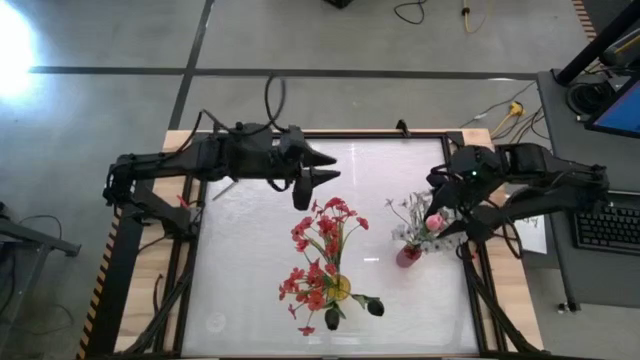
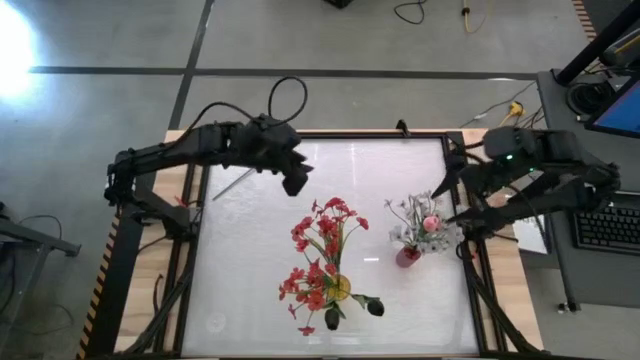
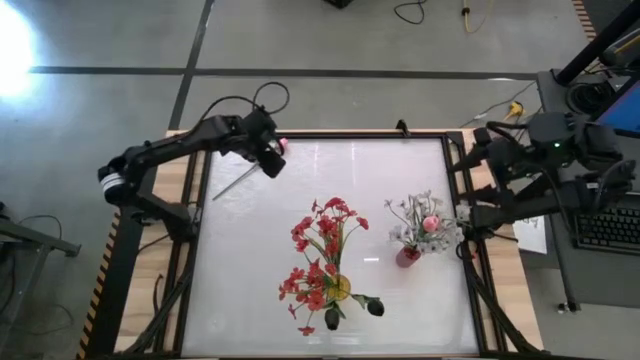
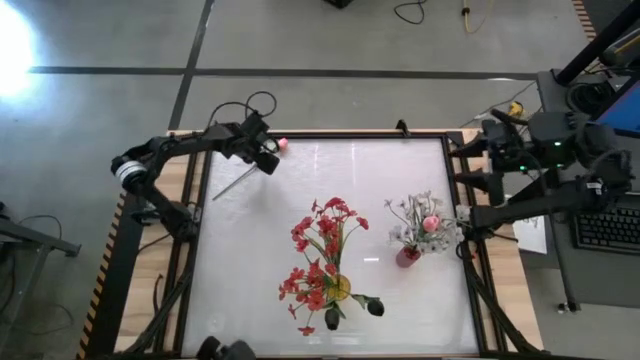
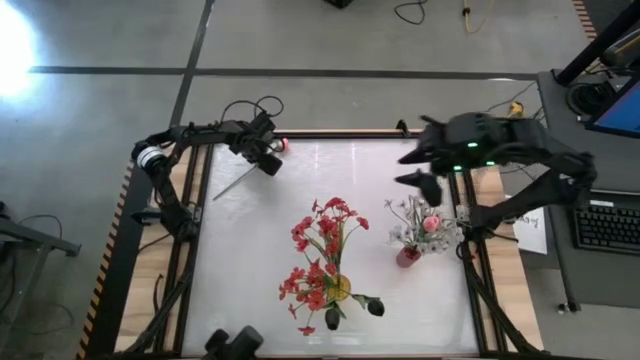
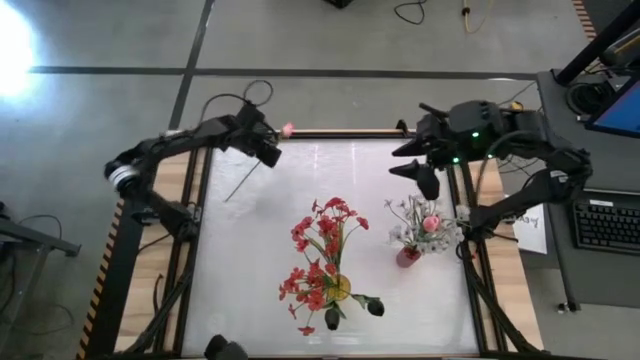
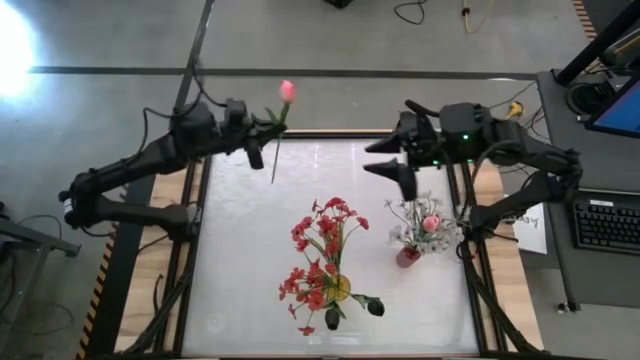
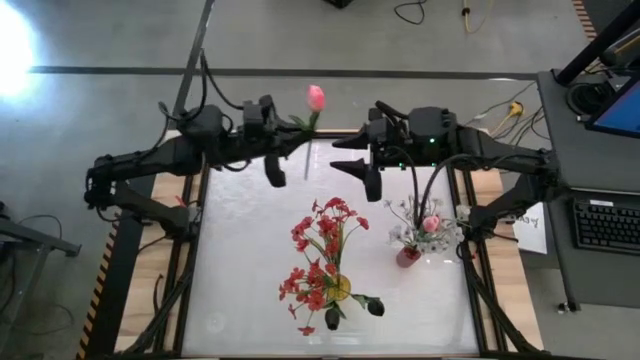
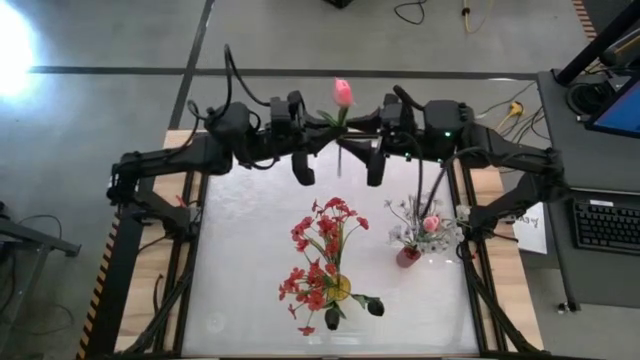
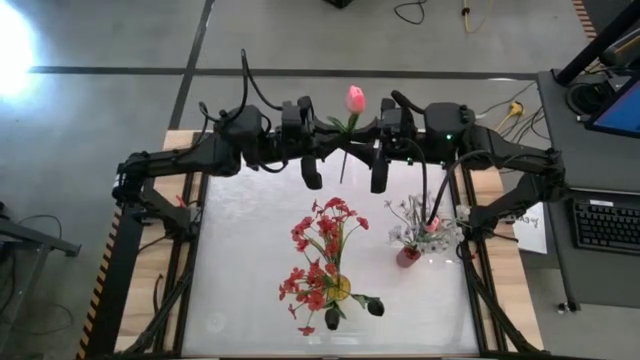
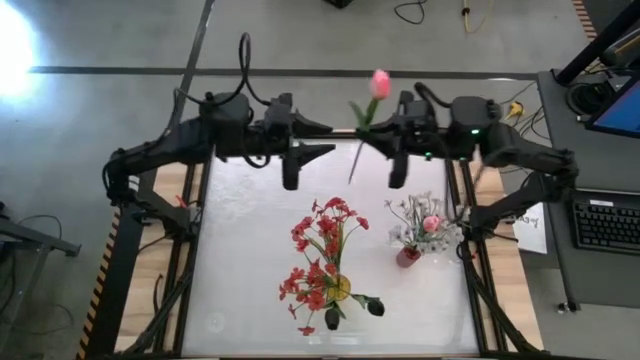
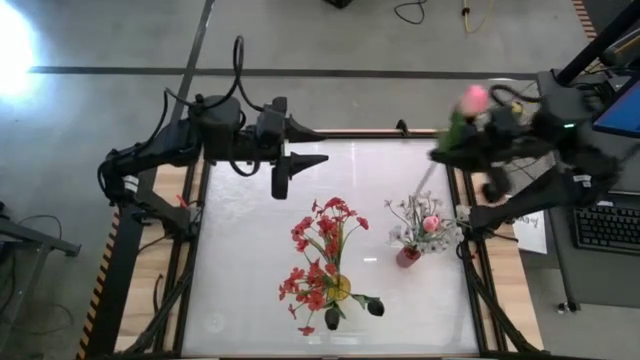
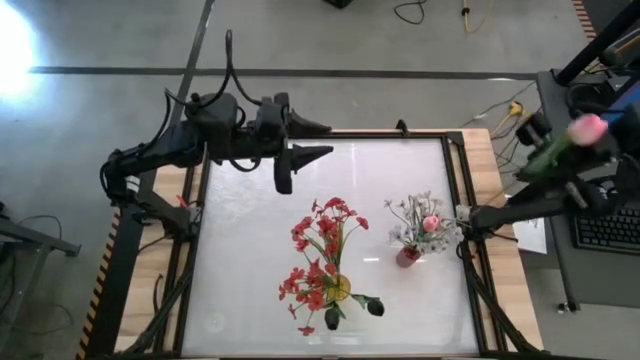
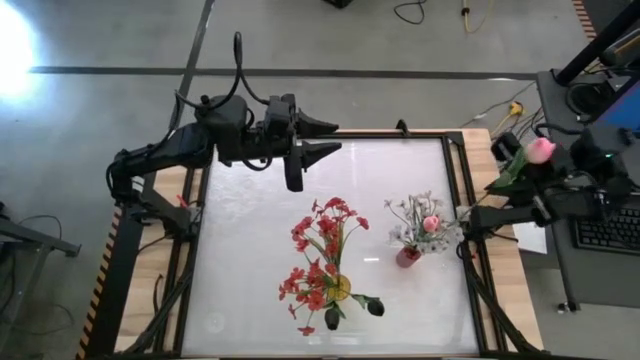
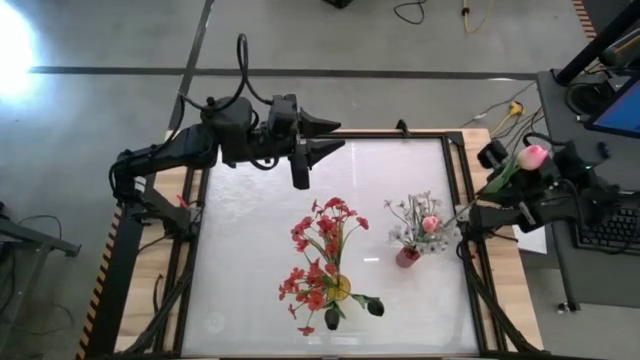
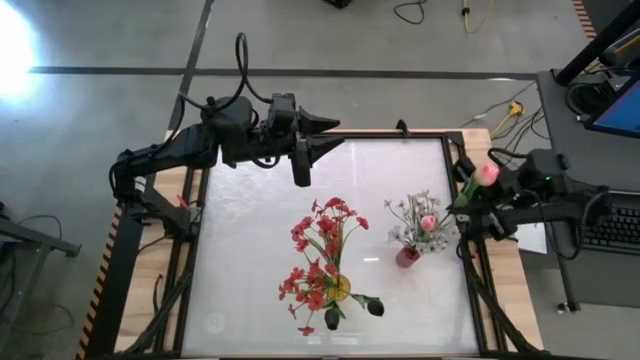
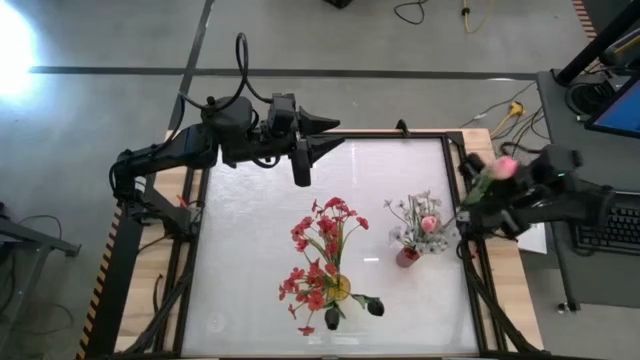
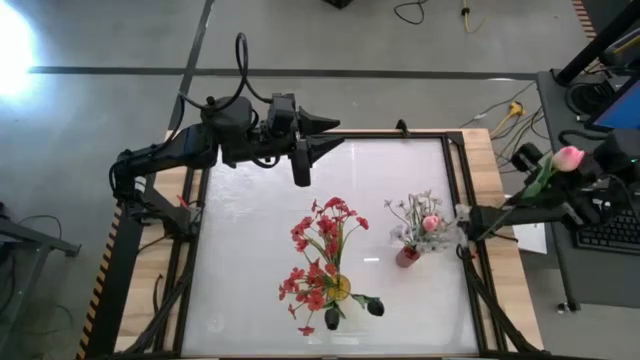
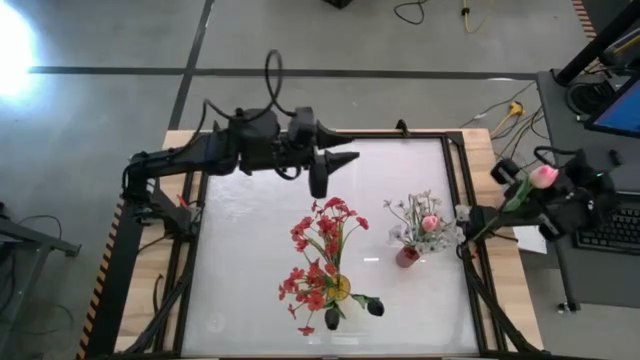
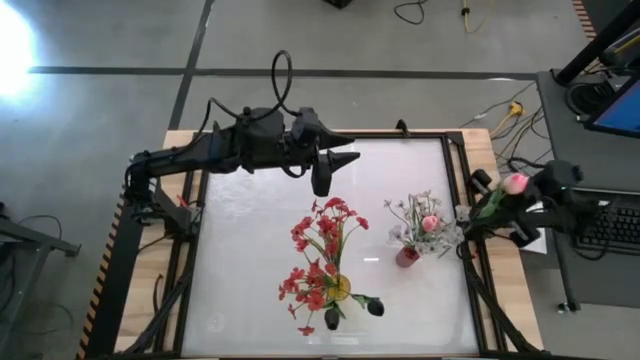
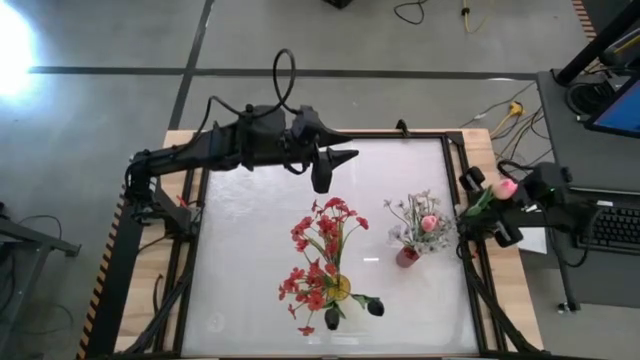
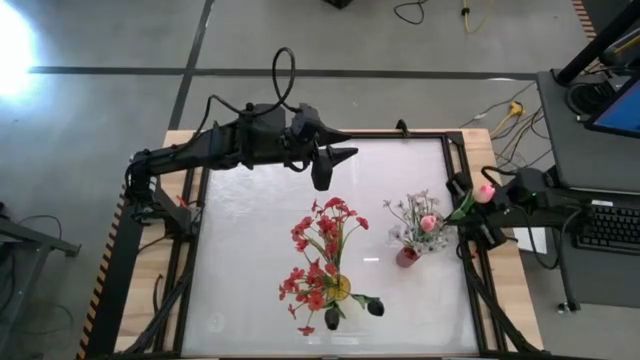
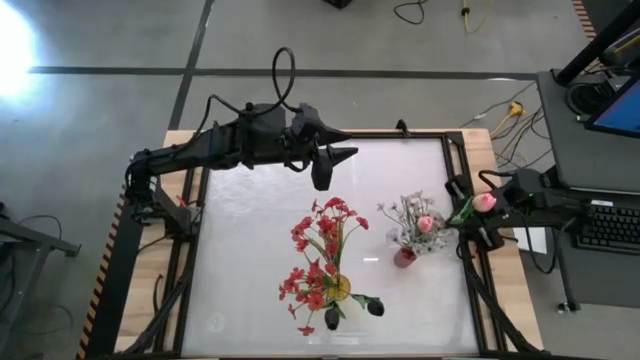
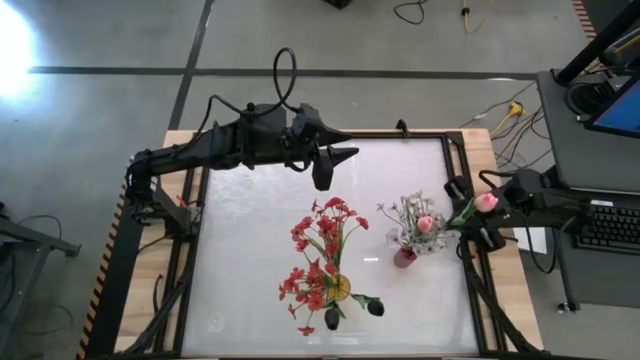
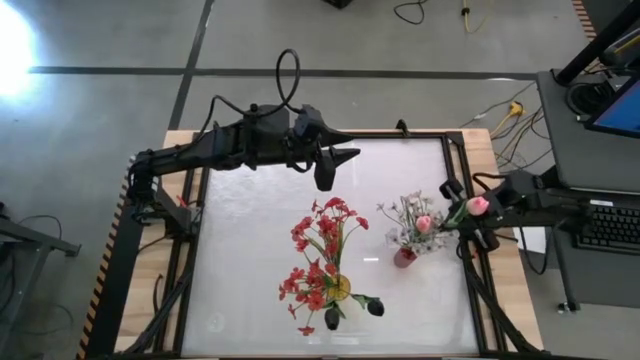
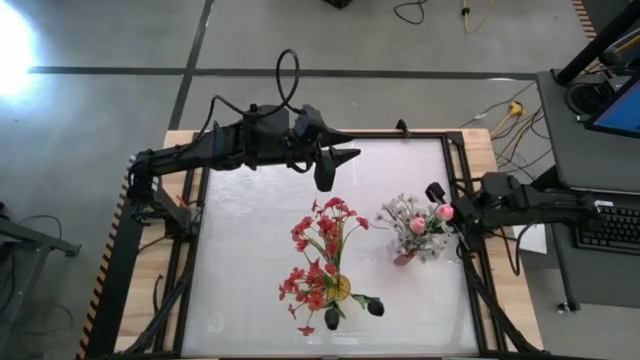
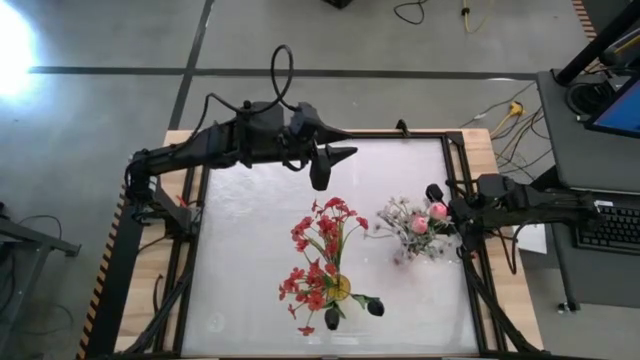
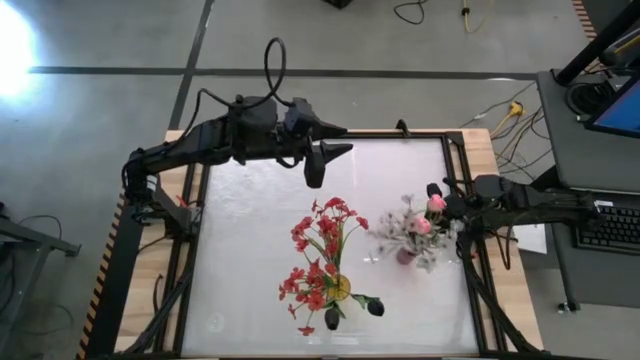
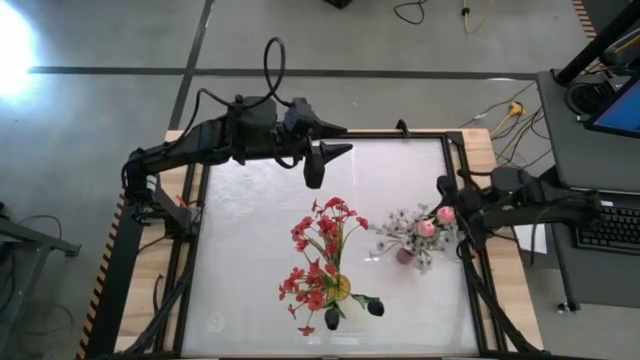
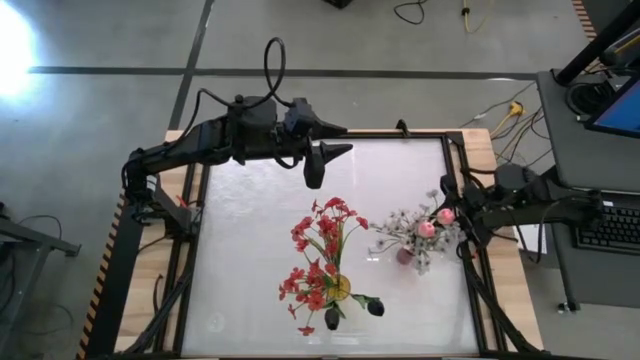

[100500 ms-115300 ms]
Task: Sort flowers into vase by color
Put the pink tulip into the red vase

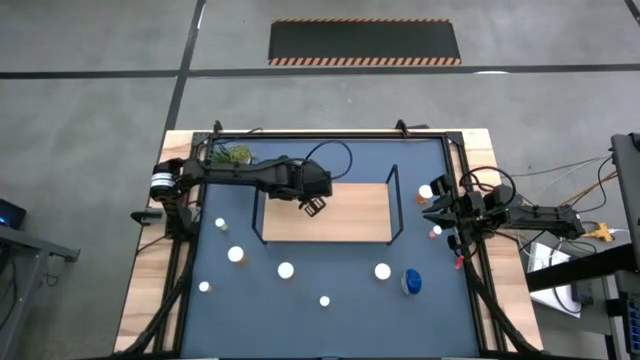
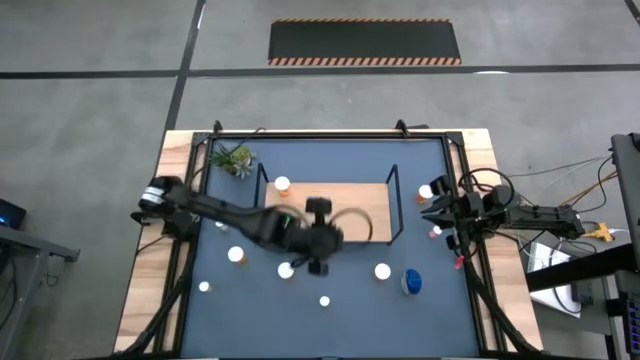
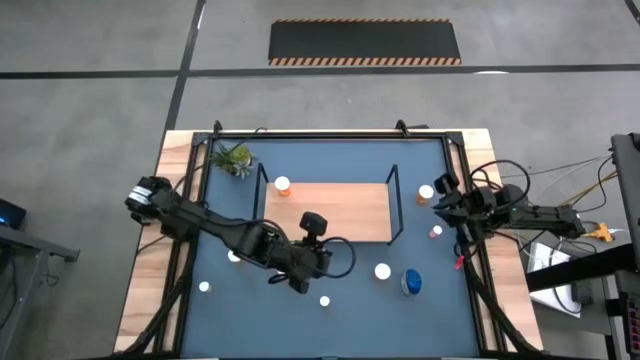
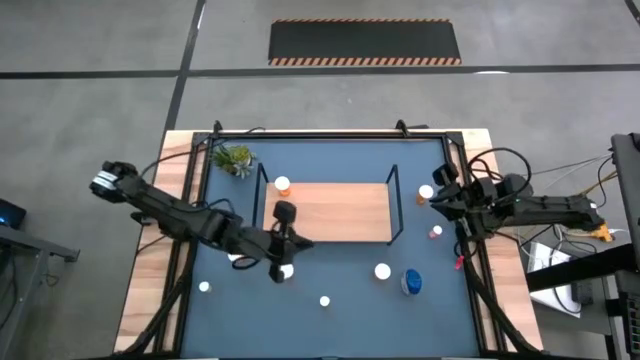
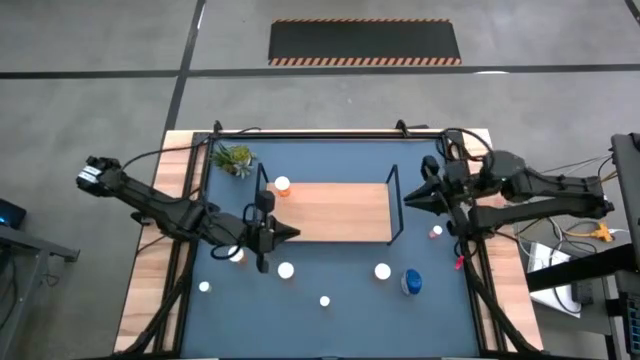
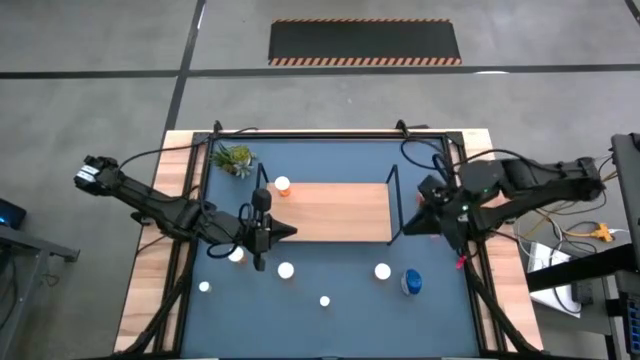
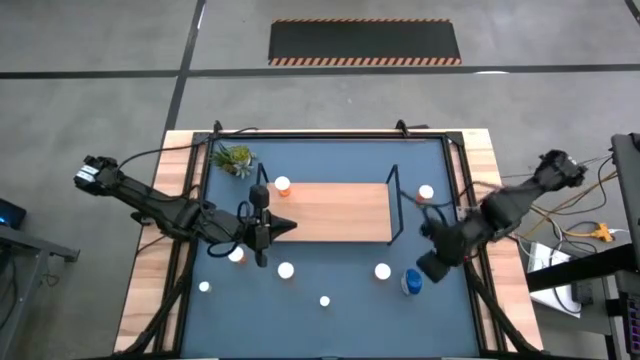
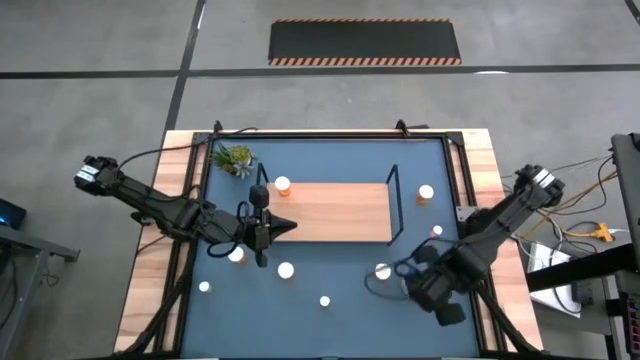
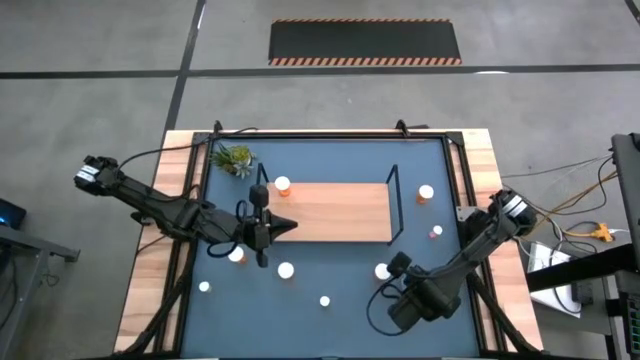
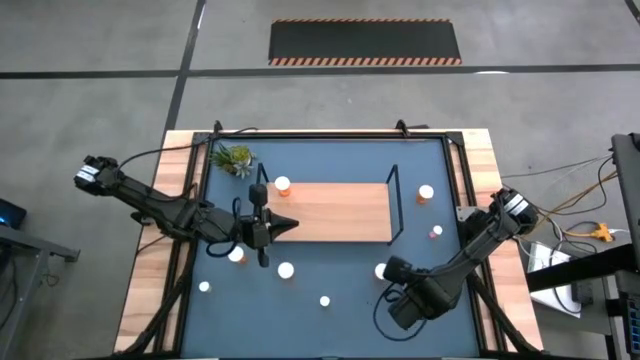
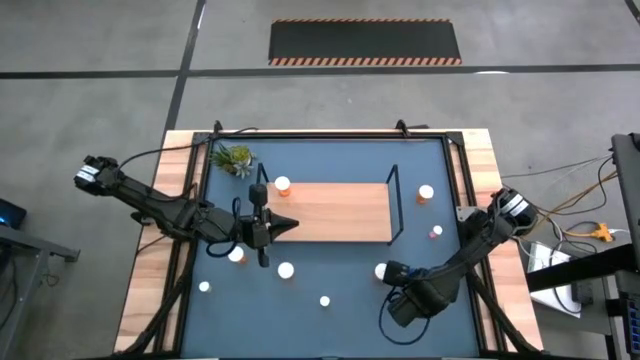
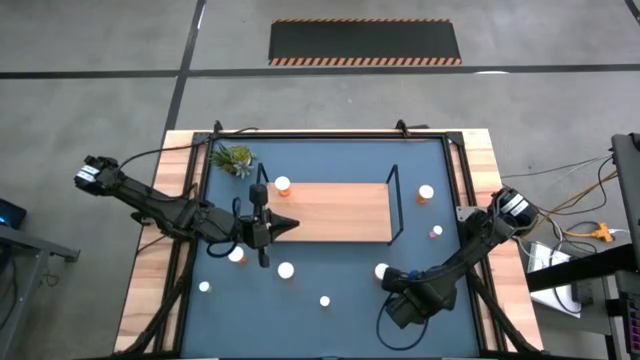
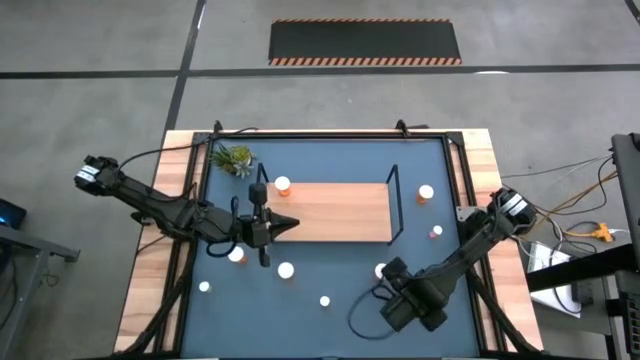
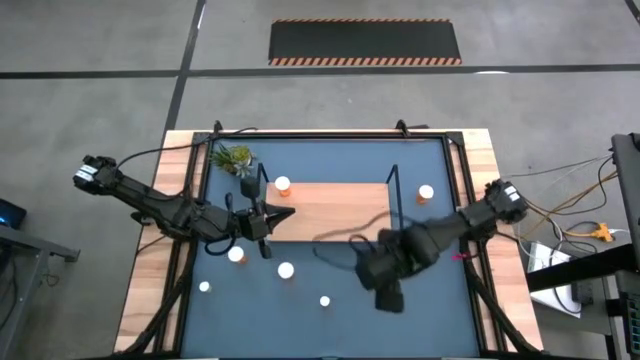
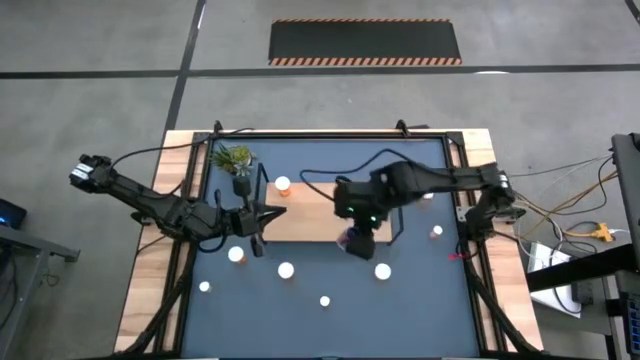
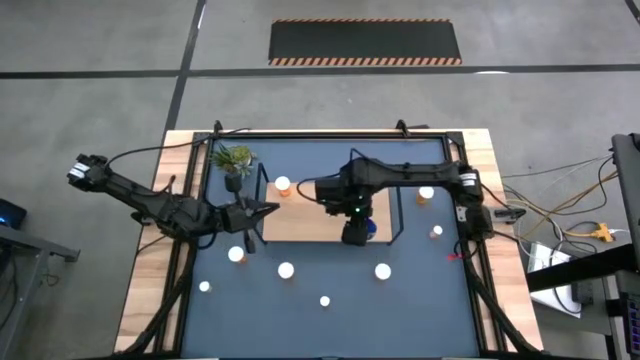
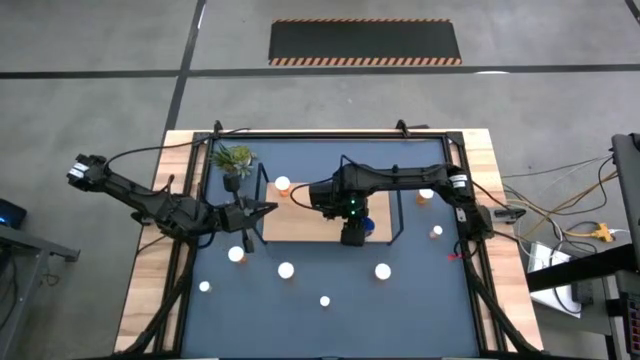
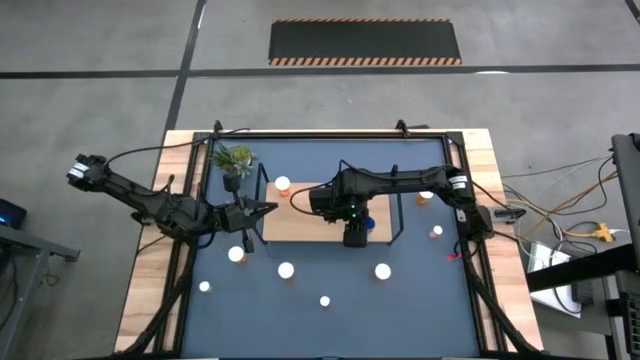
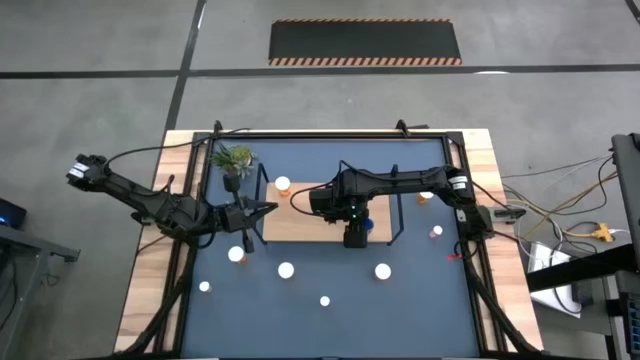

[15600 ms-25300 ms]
Task: Pick and place medicine bottles onto shelf by color
Put the blue pill bottle on to the shelf
